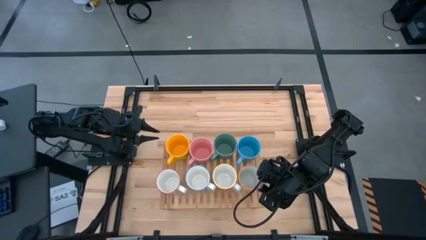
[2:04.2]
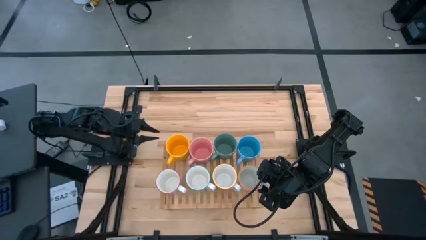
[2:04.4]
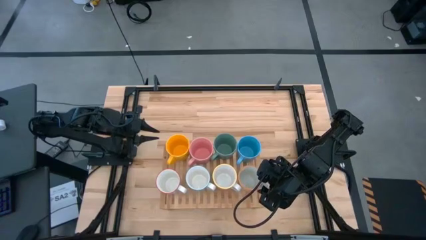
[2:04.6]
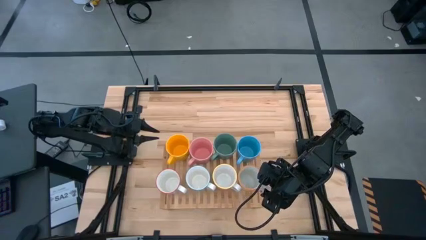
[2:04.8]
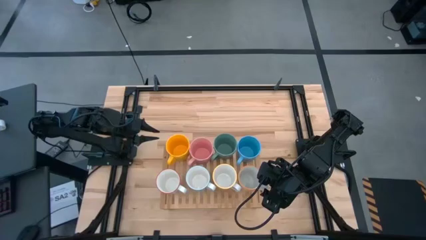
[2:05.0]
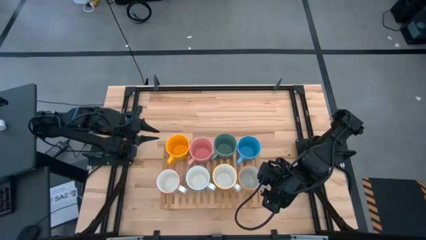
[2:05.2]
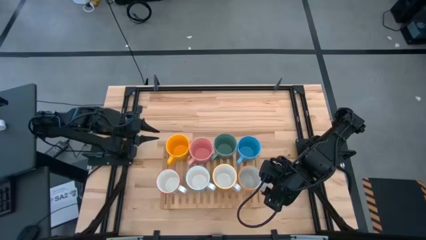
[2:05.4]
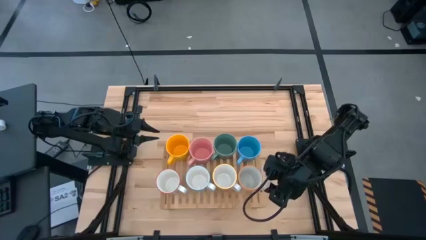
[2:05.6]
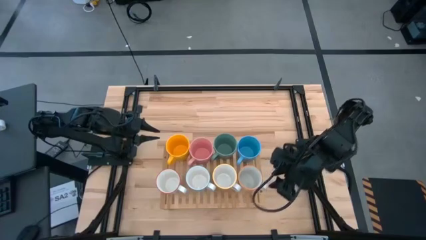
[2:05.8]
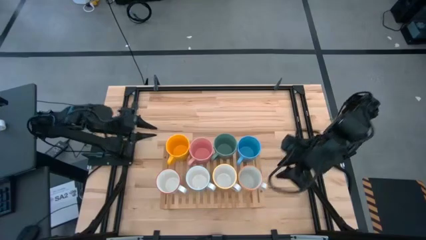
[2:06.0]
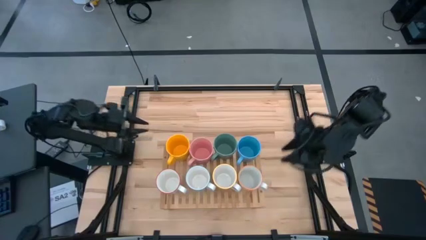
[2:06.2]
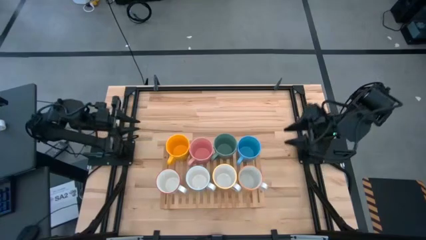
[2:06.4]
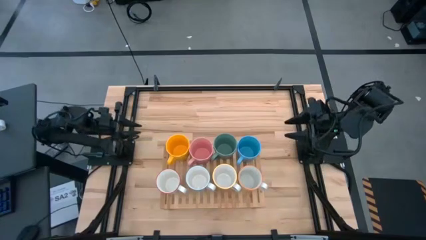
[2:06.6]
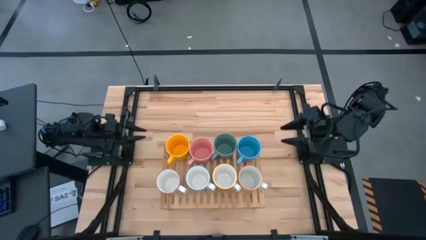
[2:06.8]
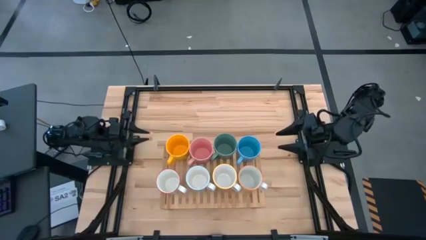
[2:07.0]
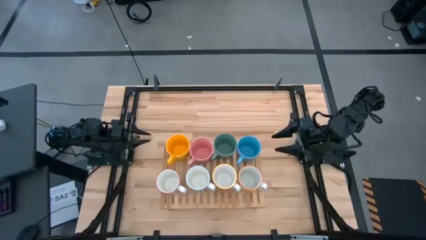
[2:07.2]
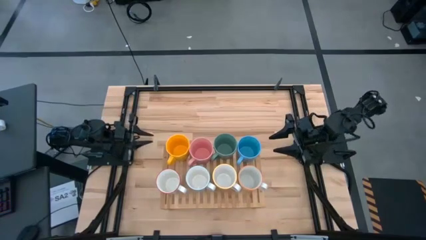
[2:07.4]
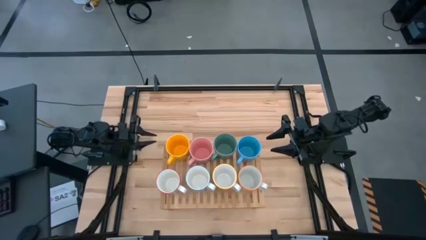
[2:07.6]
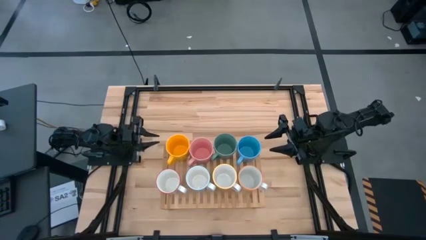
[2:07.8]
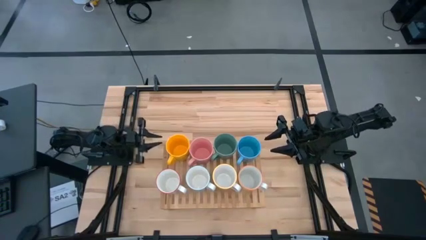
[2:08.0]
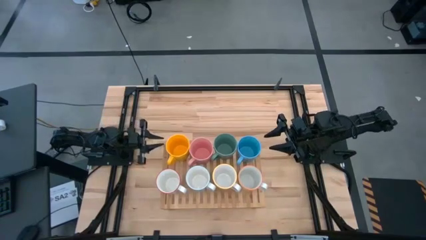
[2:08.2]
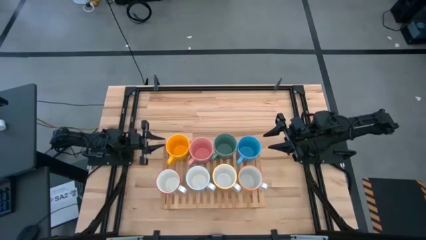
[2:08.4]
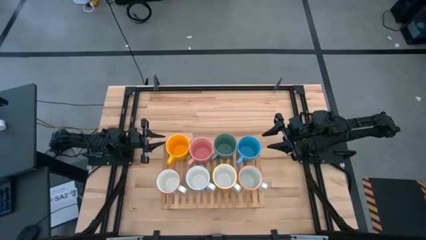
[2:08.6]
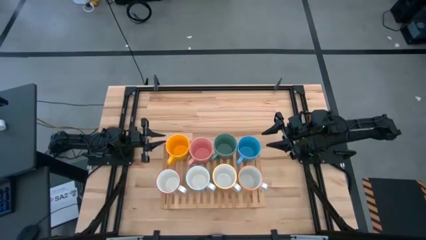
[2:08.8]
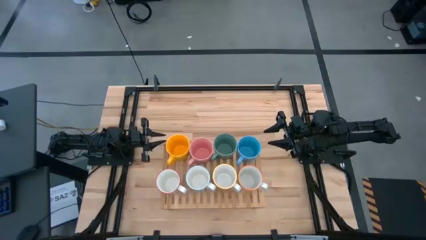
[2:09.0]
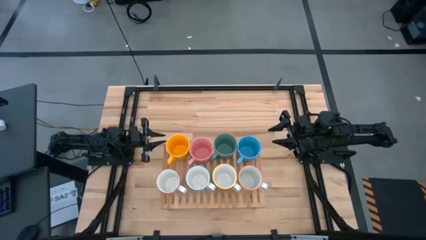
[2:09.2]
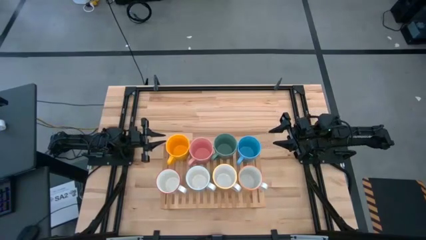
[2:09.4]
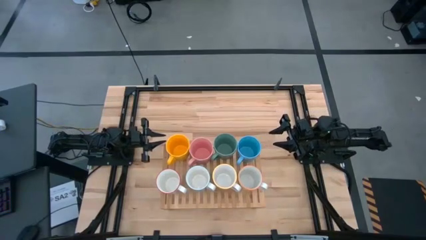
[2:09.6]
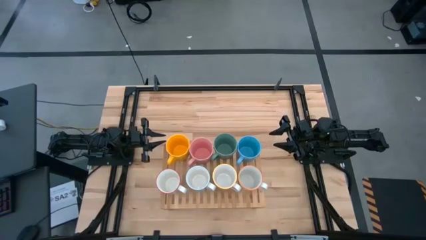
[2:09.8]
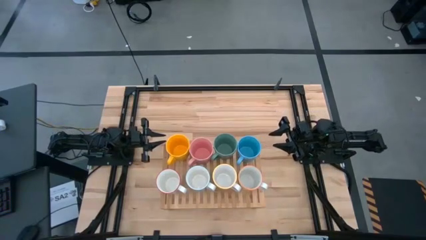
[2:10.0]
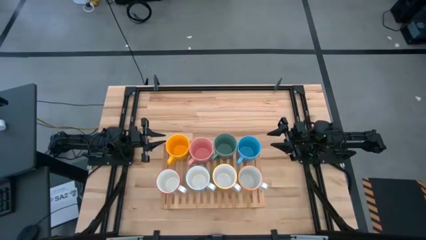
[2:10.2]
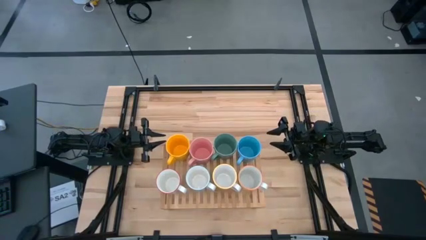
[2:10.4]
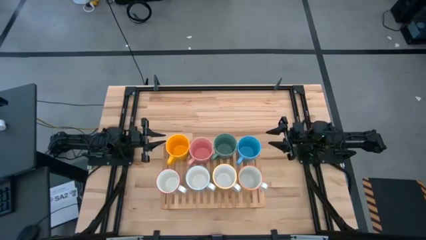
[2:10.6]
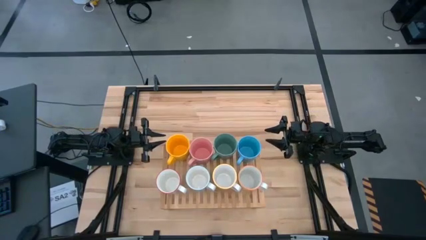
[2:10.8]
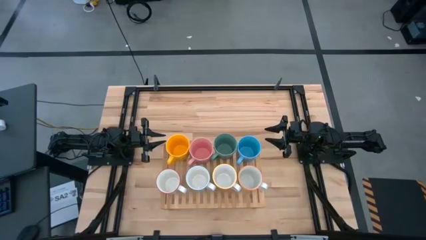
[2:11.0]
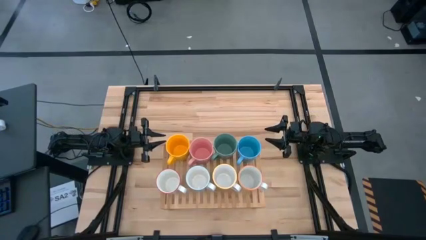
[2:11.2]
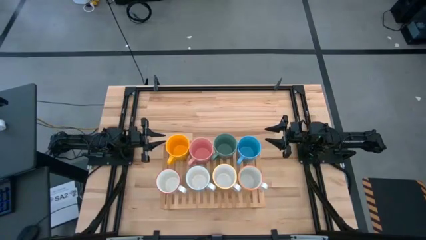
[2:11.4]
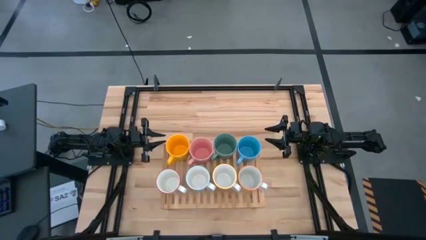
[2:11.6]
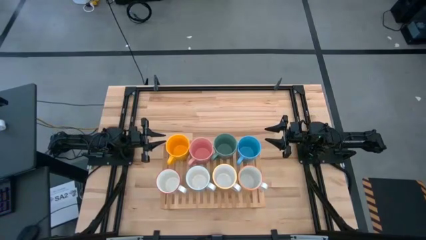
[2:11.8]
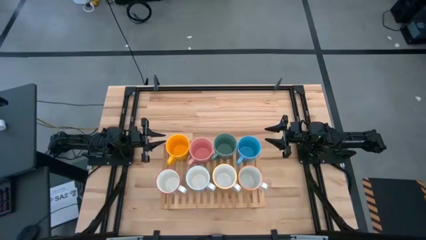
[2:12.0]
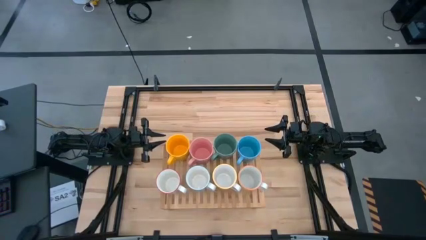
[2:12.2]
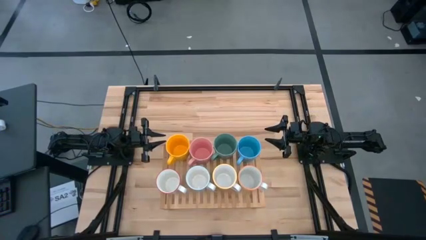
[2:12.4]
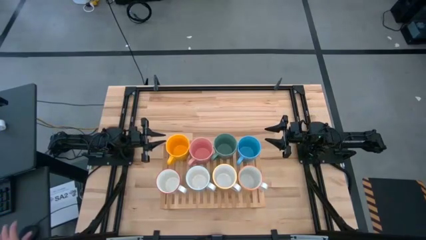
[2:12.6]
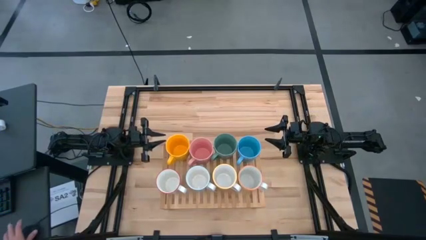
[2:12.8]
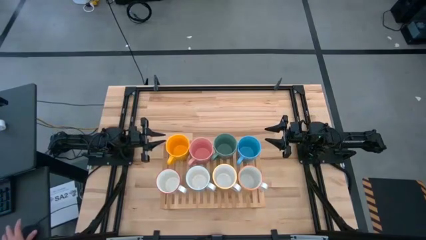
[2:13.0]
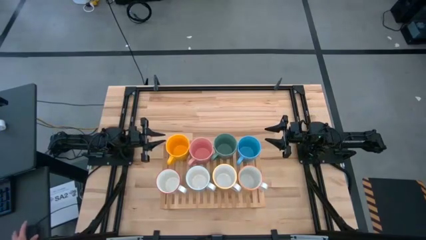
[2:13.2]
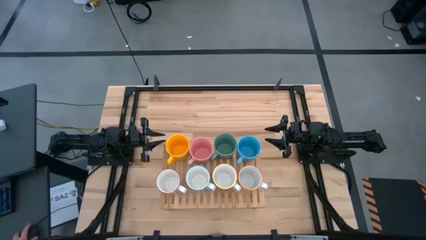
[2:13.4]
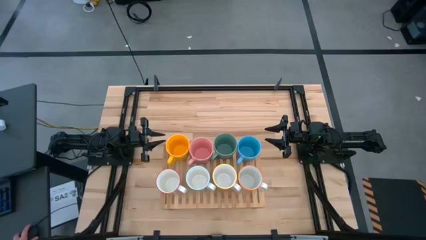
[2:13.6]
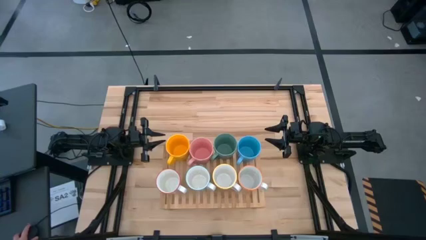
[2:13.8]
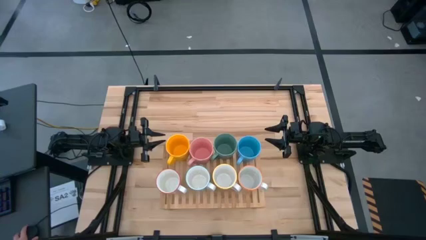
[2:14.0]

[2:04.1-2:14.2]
Task: Place coffee mugs
Return to Home Position
